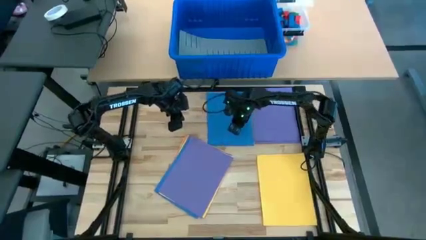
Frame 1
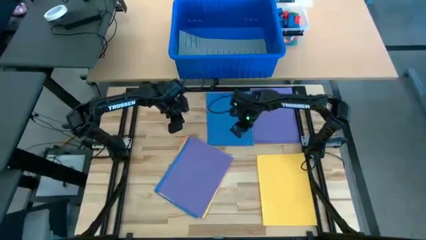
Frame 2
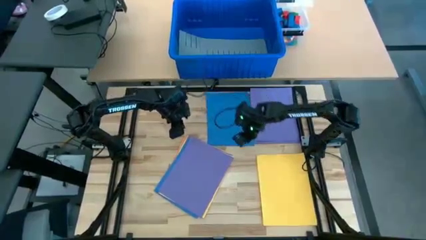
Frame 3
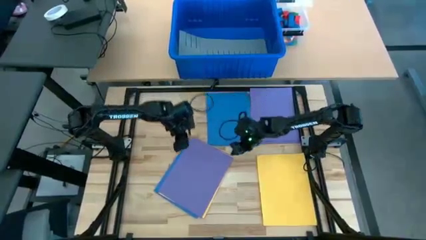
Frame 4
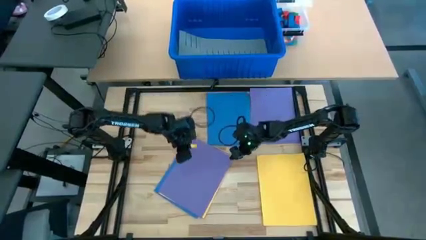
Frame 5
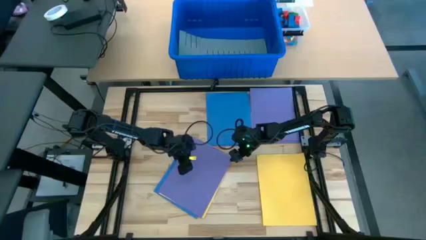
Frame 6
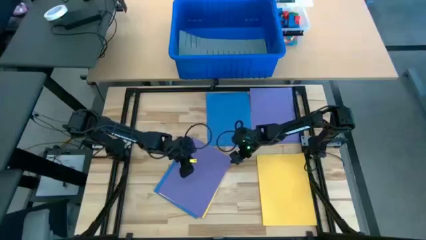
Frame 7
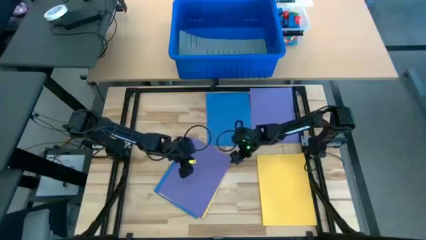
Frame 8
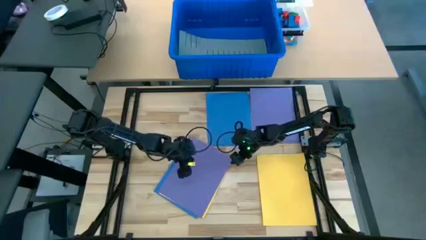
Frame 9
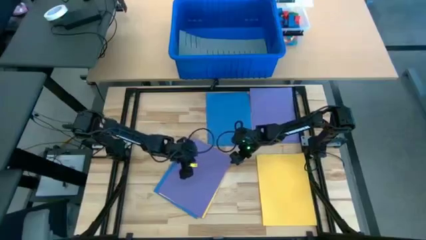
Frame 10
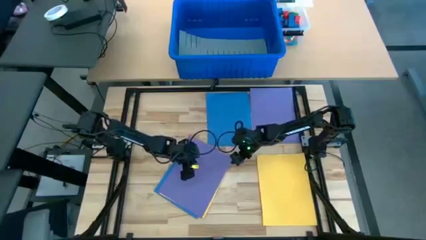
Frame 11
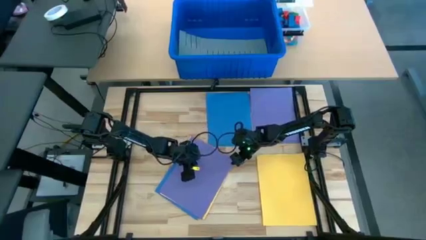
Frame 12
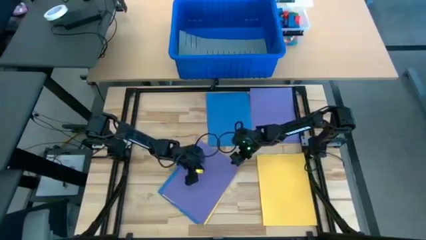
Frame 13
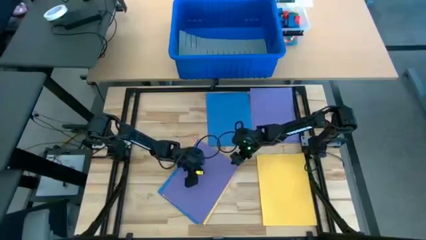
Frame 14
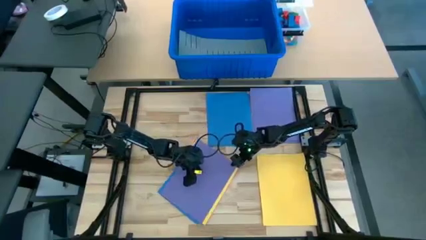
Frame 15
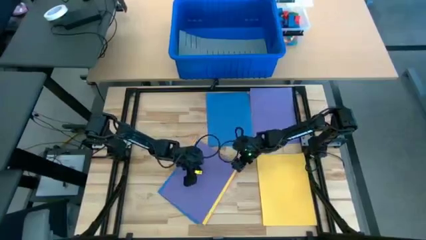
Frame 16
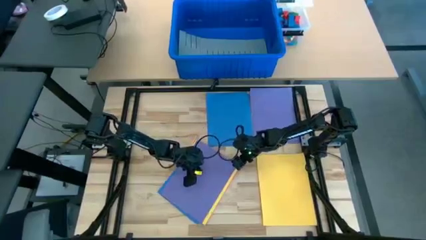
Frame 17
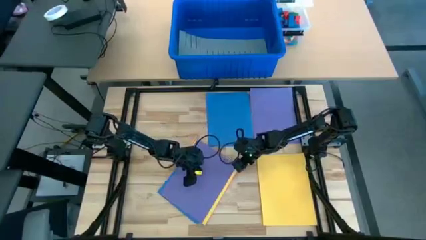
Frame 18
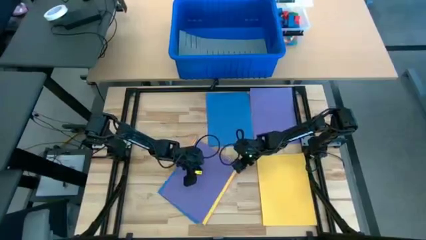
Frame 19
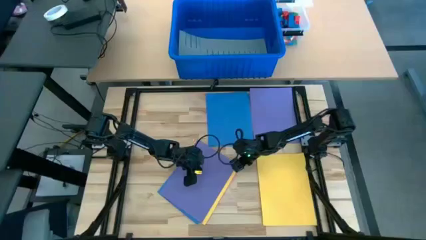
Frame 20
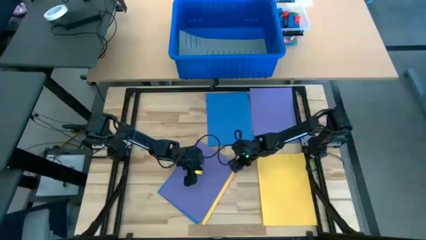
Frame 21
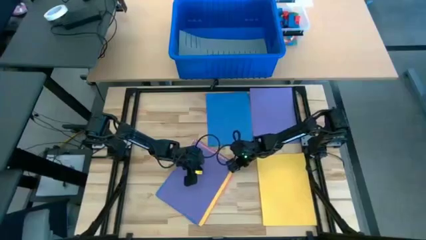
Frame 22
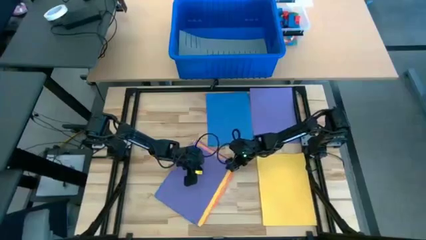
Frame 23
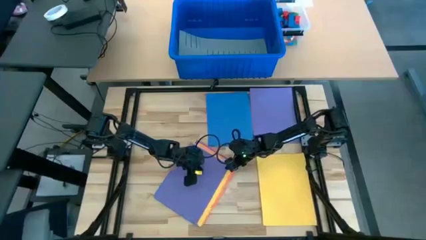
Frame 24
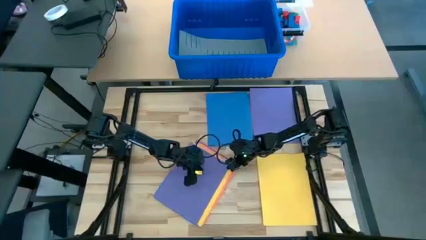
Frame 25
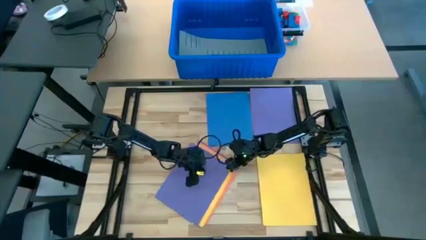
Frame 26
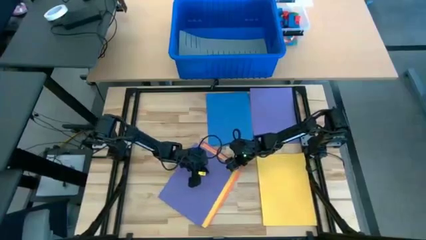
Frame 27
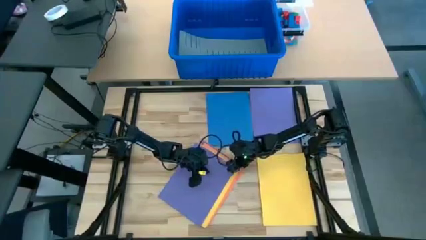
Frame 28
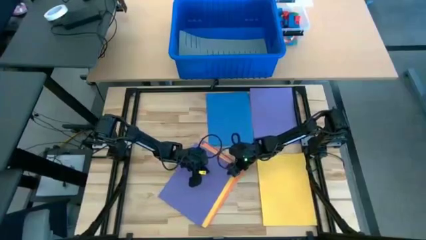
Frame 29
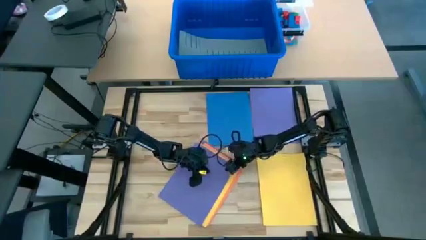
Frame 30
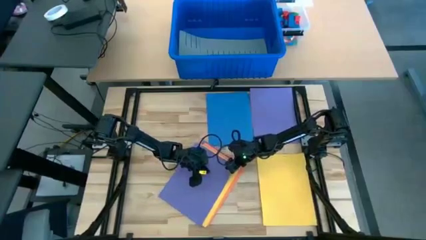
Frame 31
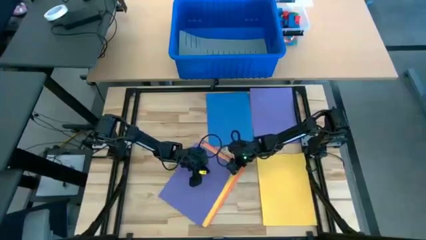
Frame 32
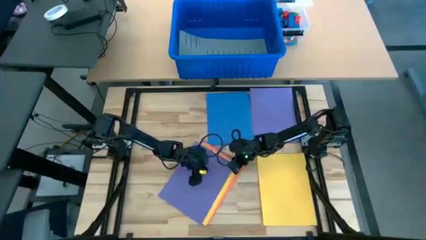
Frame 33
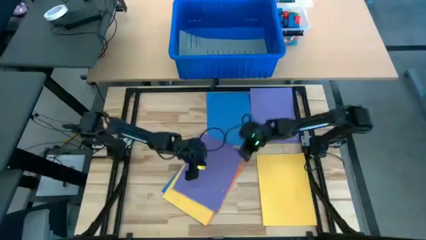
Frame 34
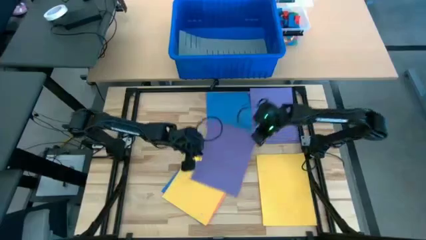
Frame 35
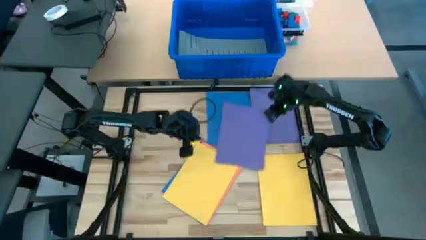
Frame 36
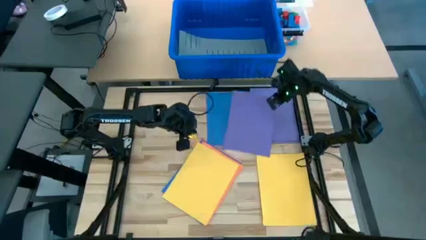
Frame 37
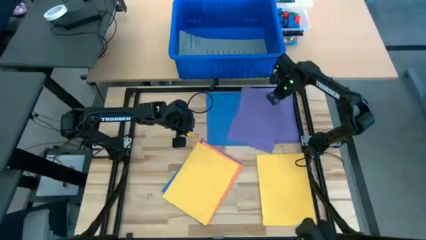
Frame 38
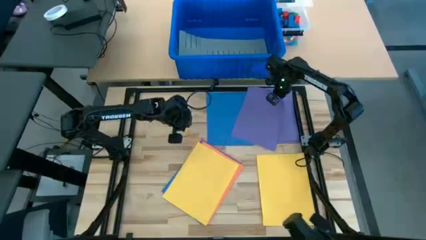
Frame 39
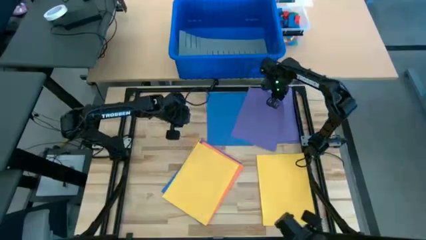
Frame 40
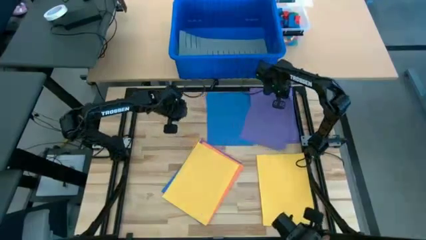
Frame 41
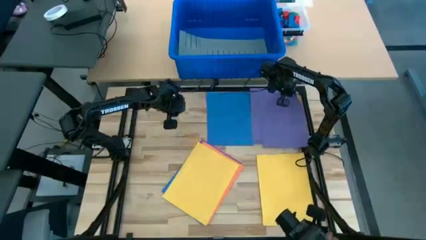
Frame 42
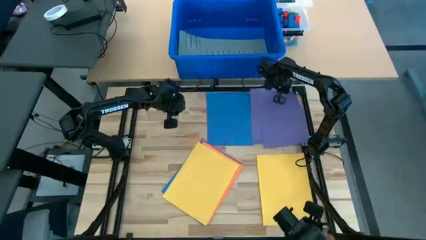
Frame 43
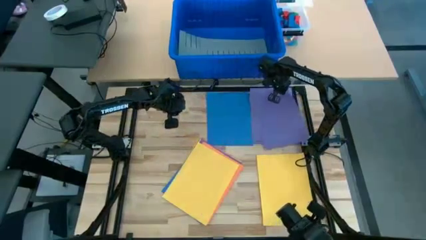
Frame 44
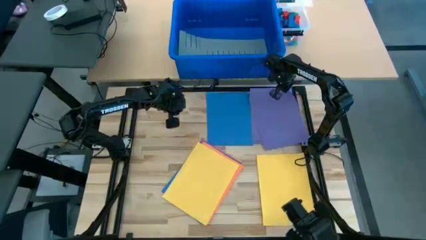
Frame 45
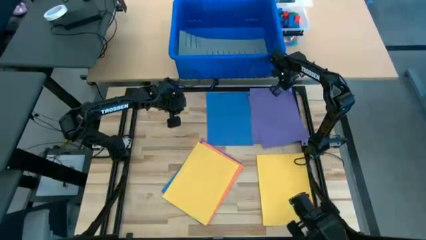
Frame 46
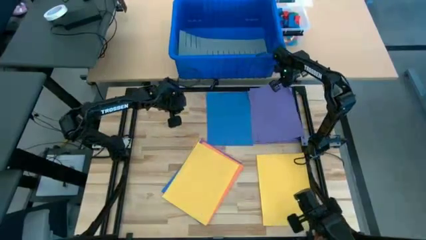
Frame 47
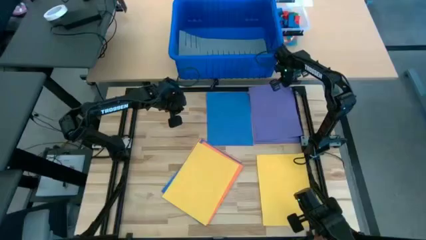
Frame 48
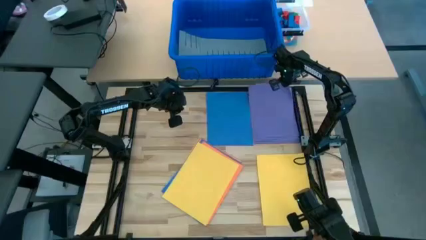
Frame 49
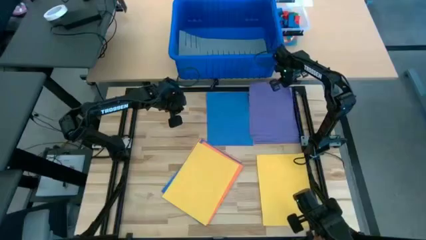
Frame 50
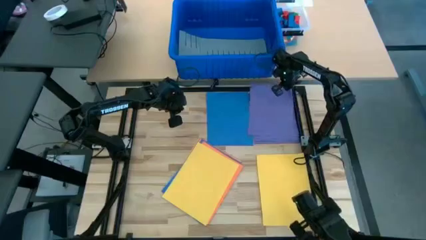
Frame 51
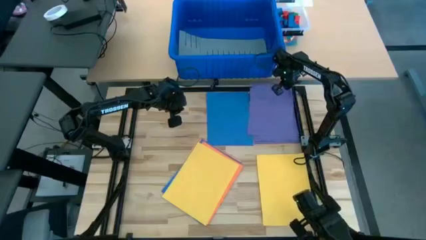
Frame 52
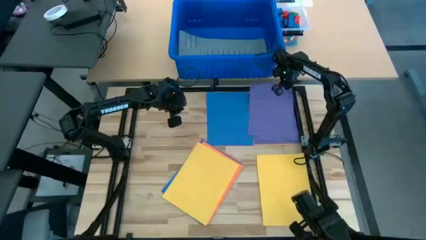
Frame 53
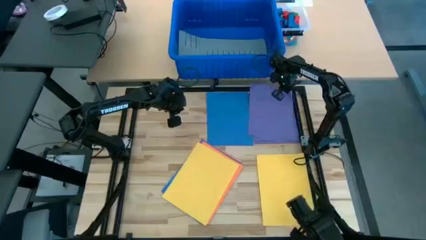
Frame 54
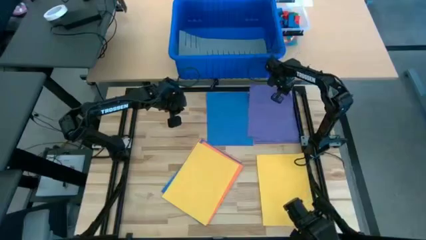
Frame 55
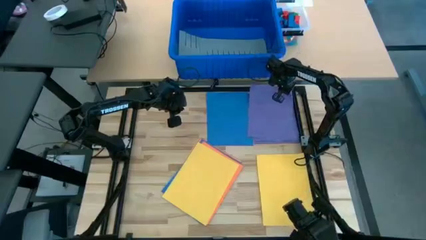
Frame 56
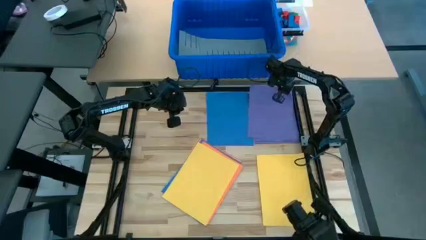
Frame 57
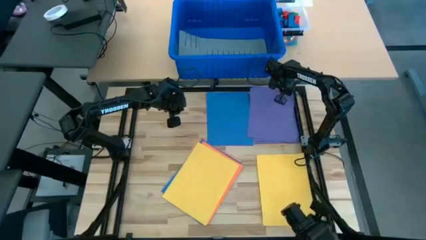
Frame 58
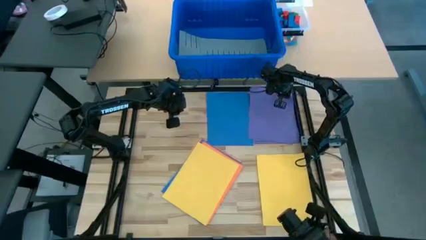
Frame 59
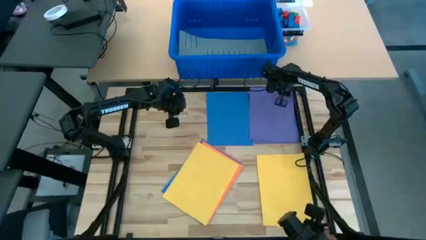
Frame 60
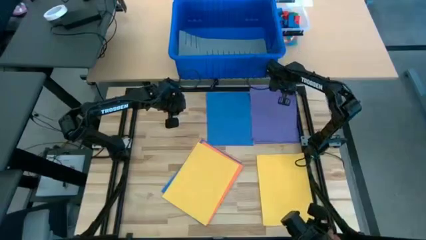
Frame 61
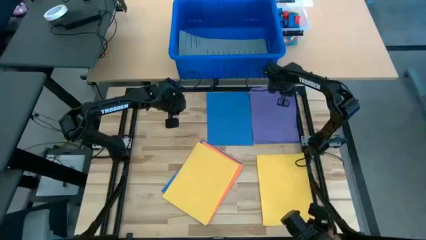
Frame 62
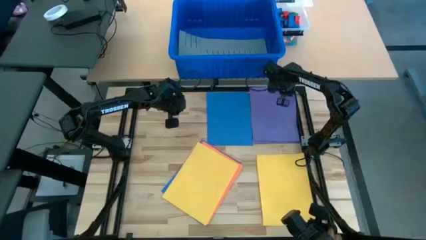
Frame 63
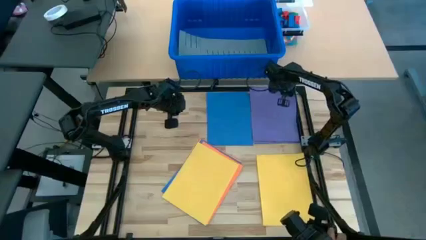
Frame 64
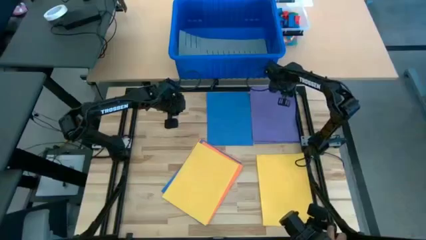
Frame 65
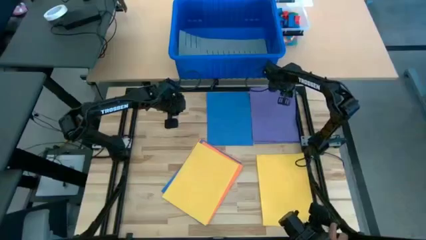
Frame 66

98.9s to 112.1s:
Task: Organize paper
Stack the purple paper on top of the other purple papers
